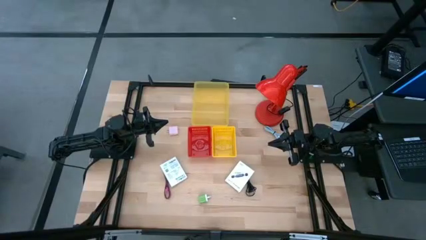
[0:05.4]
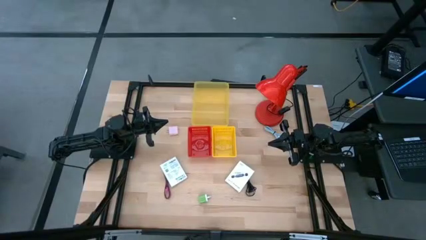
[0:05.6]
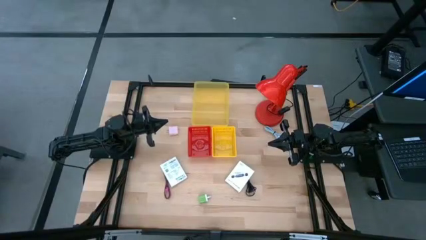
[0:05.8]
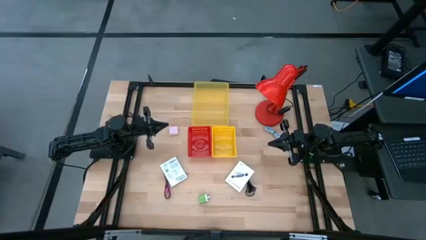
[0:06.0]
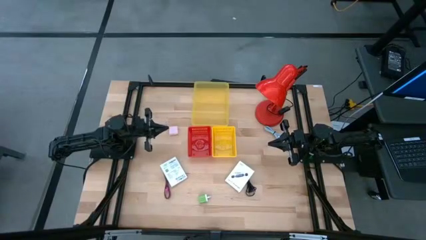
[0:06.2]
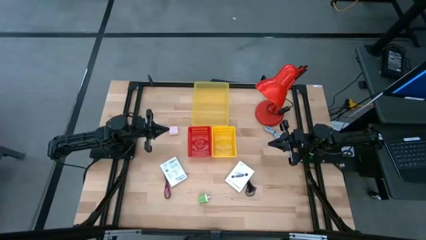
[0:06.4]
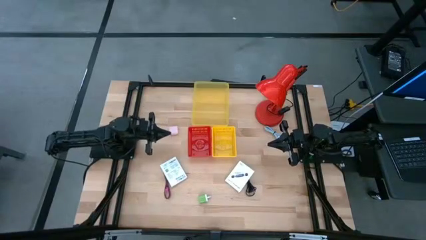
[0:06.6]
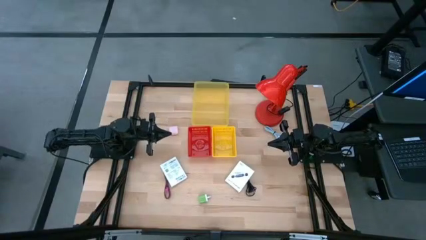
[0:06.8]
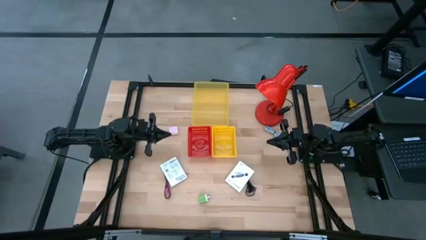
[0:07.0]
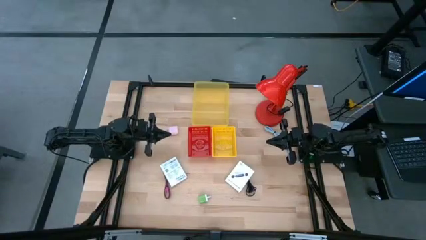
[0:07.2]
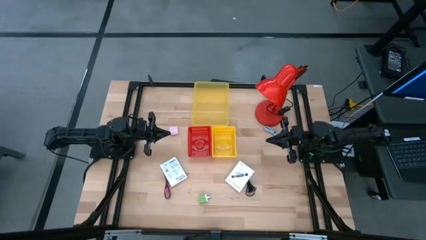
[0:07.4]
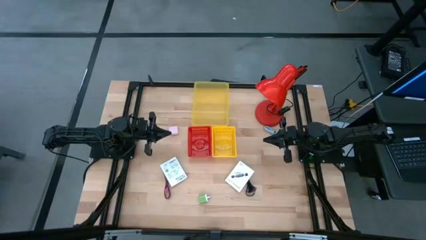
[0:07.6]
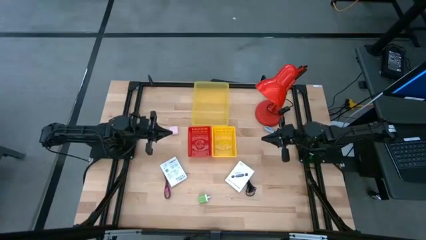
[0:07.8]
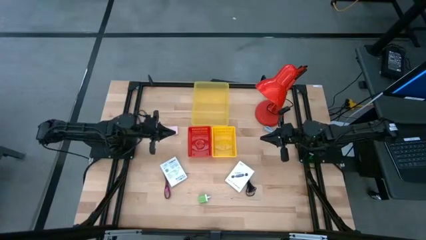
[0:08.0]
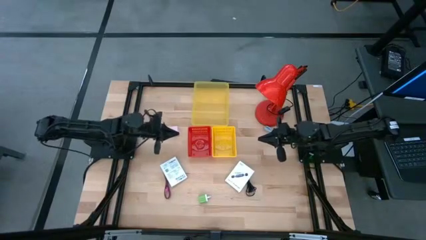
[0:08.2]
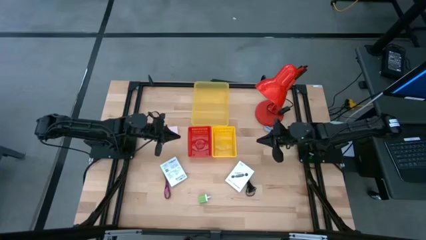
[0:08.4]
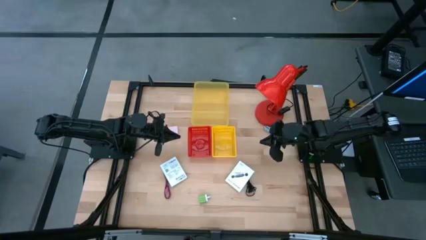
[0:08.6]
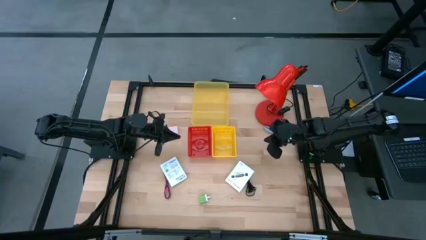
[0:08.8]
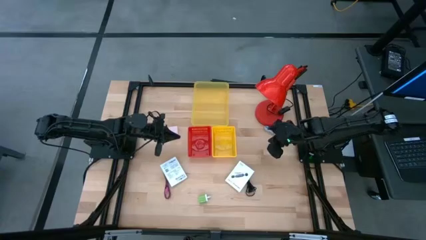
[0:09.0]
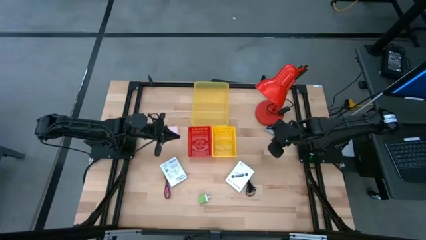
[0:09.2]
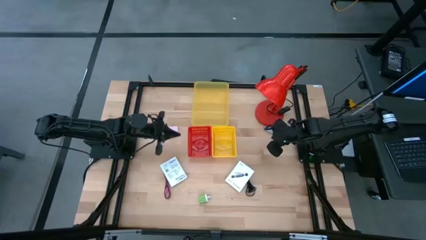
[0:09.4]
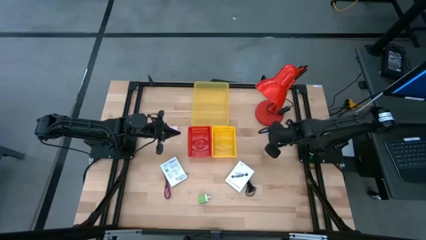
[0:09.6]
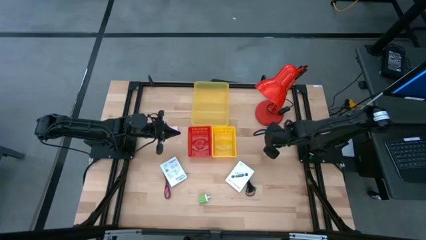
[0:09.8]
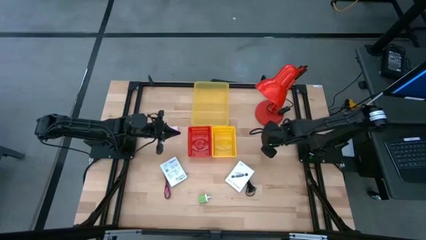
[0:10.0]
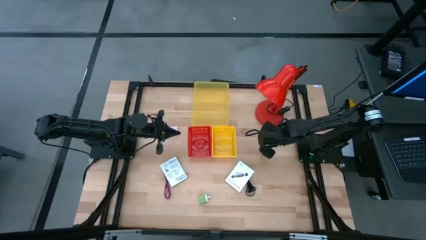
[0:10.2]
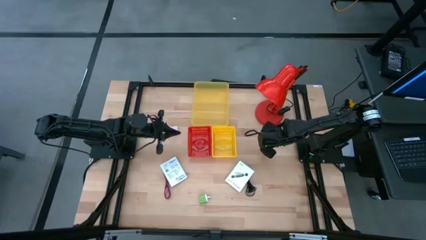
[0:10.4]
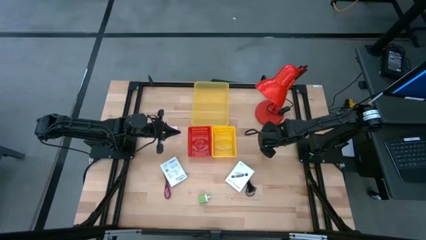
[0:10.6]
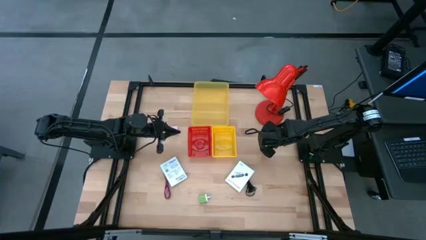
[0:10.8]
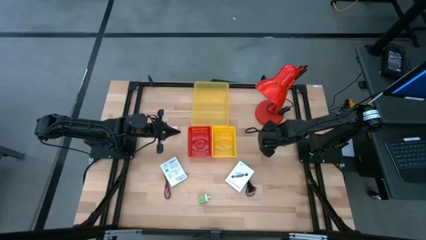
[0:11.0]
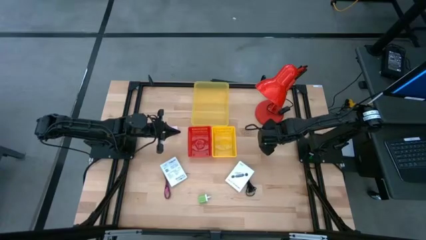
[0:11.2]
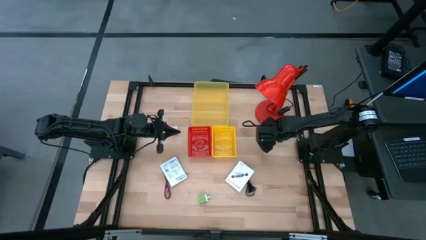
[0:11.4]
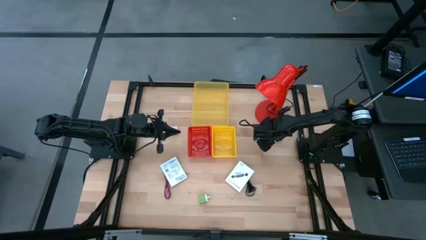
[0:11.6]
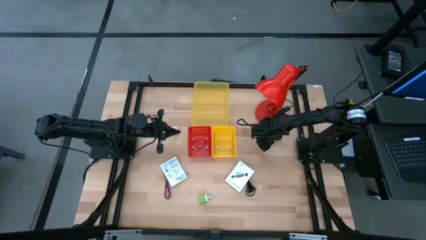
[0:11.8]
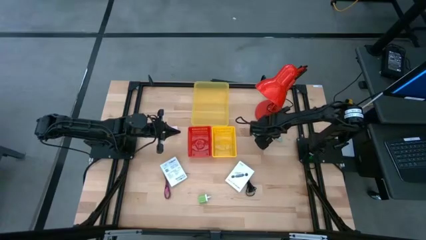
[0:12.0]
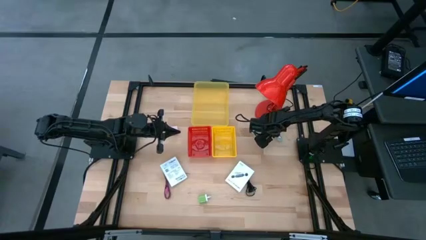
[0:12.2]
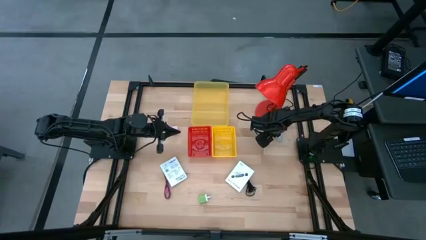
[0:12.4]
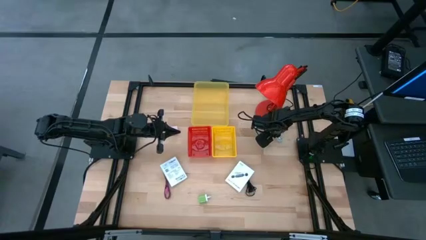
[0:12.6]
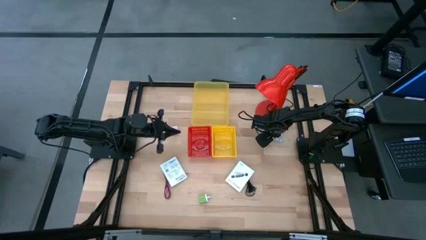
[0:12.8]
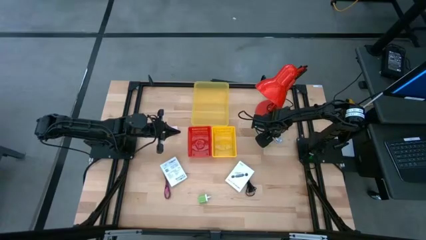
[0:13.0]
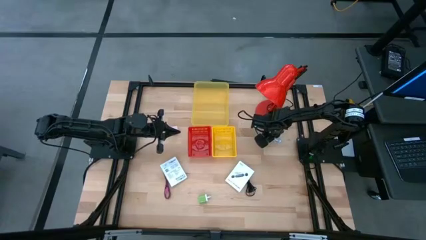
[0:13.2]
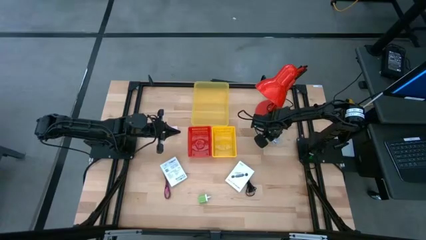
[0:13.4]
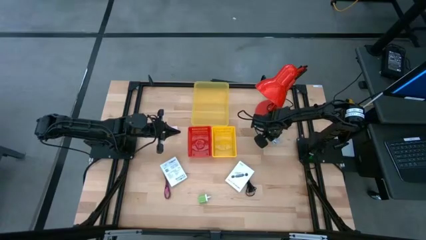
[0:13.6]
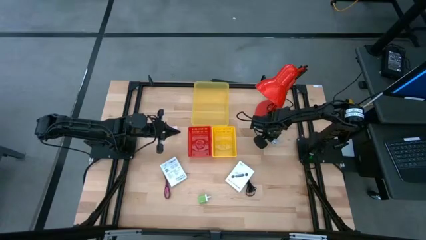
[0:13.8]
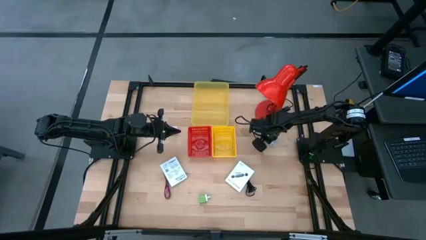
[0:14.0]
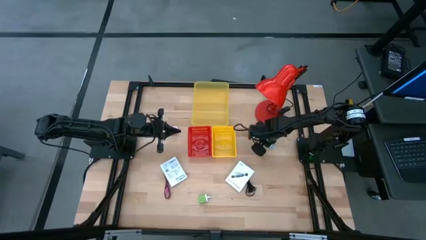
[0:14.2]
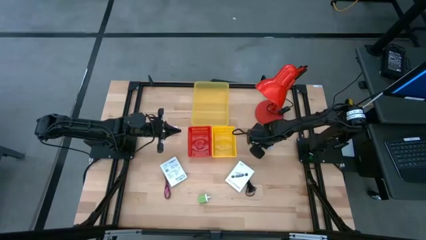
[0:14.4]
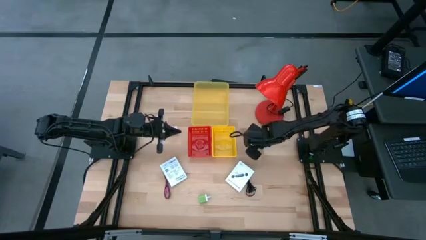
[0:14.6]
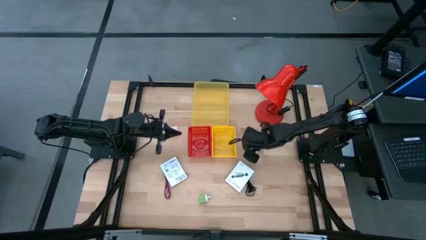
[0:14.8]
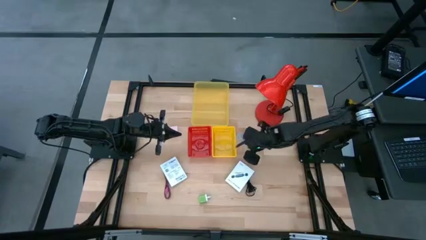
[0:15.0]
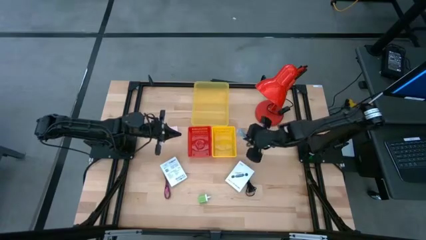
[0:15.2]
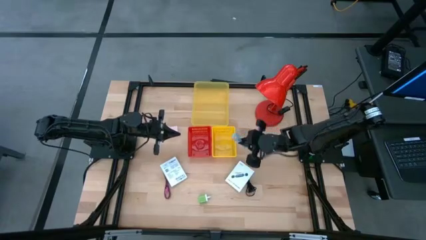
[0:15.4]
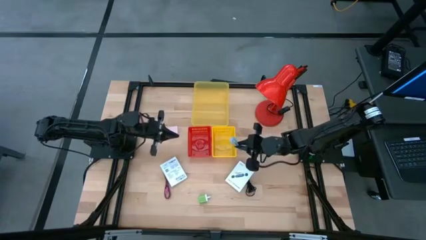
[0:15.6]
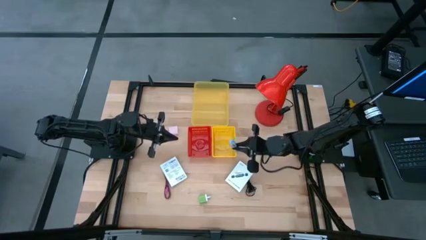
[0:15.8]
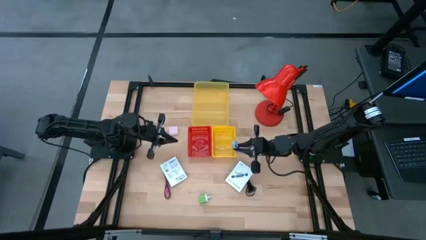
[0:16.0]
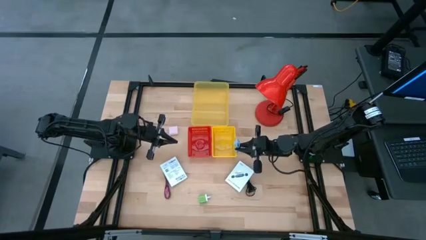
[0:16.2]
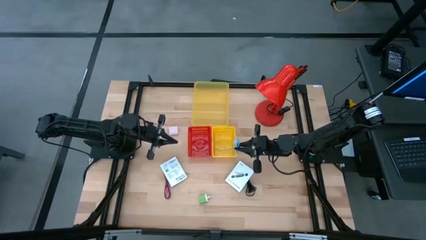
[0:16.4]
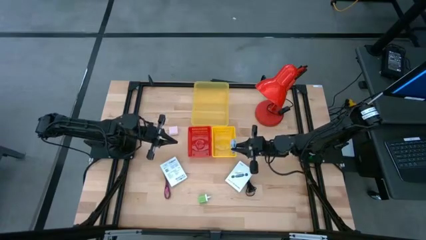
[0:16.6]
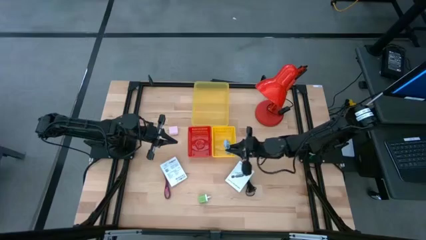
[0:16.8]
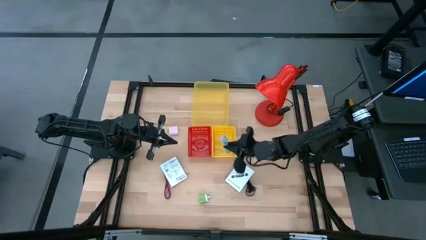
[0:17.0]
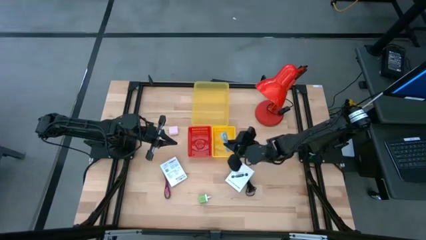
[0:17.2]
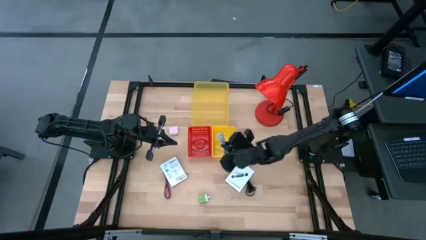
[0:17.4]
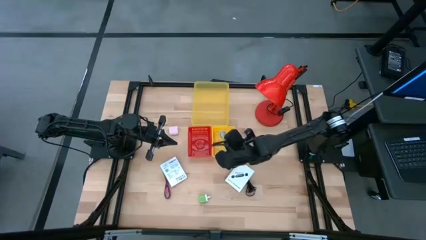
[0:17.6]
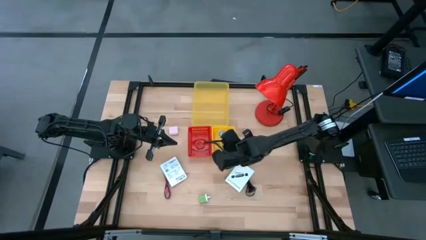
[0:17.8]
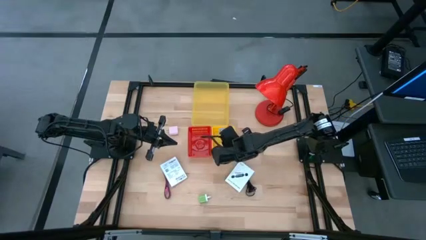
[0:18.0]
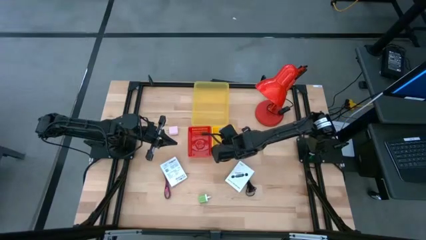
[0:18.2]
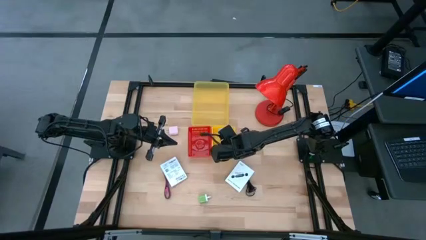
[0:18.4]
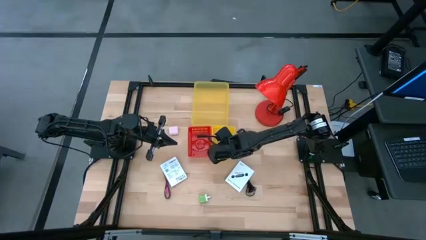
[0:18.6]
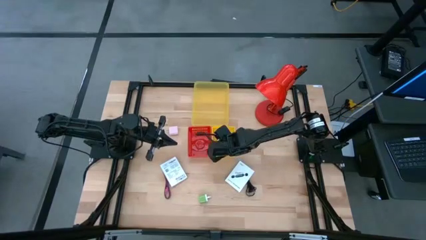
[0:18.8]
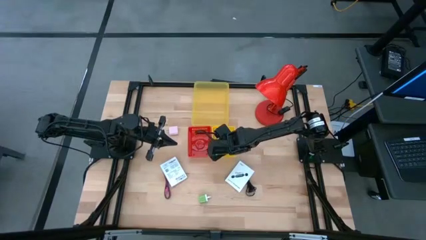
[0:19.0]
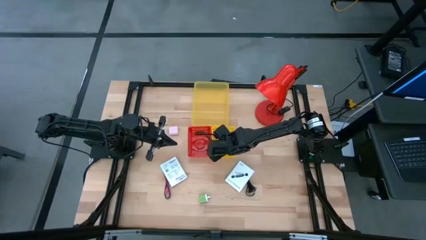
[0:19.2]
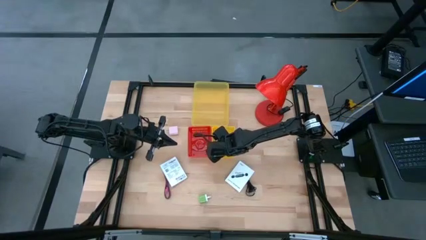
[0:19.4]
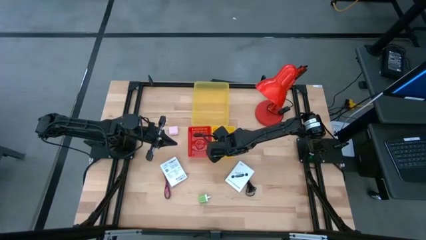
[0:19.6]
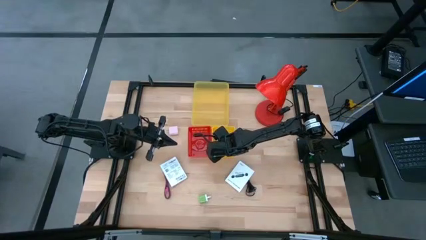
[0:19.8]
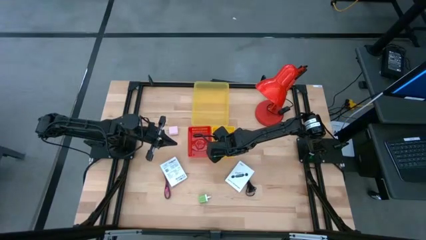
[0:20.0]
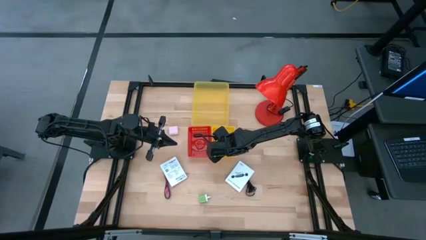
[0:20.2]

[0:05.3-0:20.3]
Task: Pick and place items into bin
Put the blue charger cable into the yellow bin
